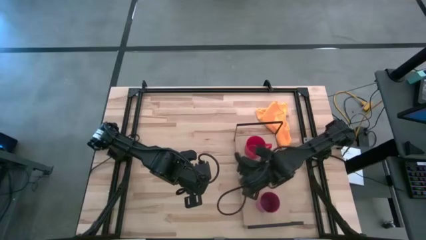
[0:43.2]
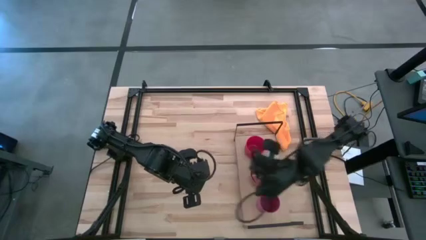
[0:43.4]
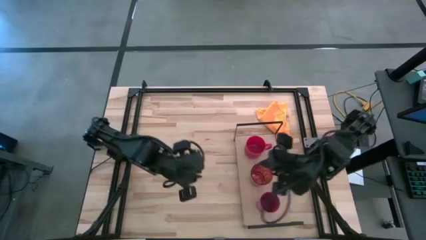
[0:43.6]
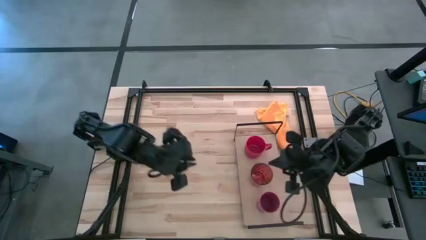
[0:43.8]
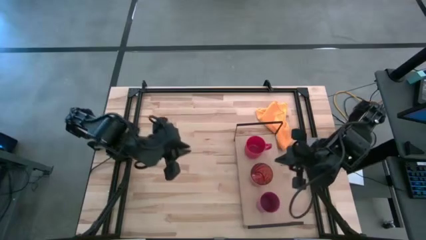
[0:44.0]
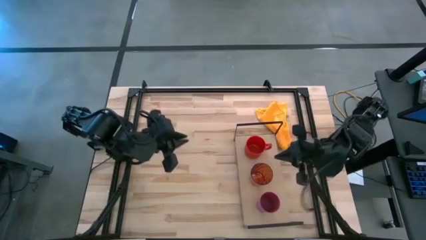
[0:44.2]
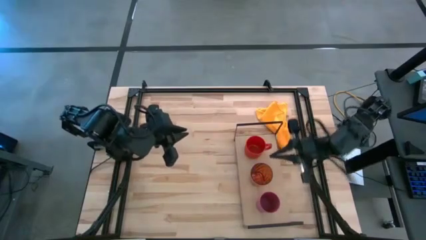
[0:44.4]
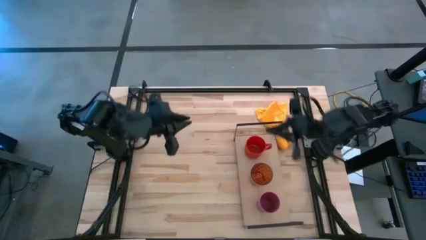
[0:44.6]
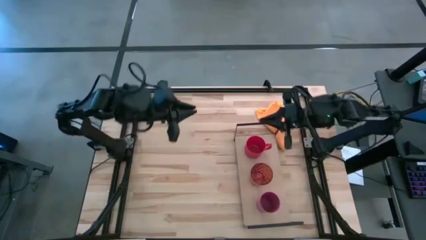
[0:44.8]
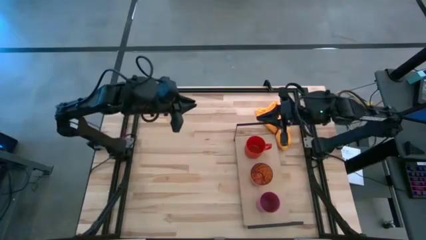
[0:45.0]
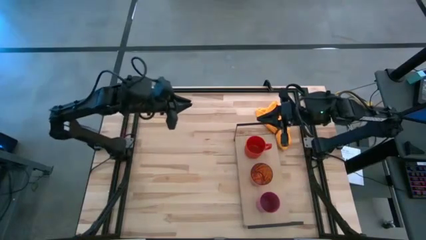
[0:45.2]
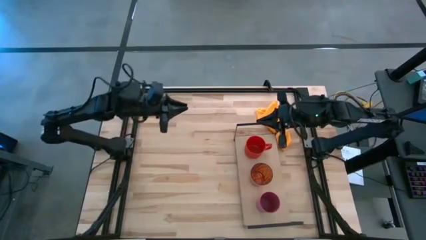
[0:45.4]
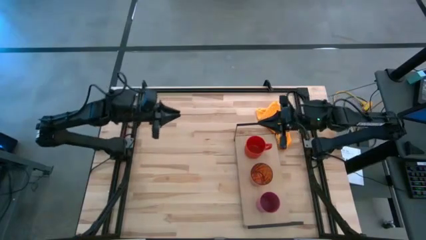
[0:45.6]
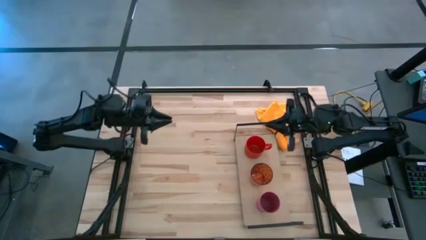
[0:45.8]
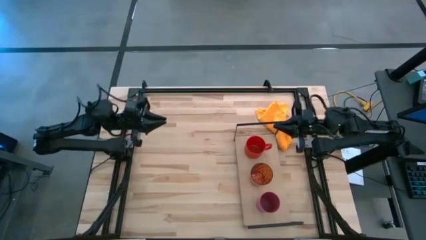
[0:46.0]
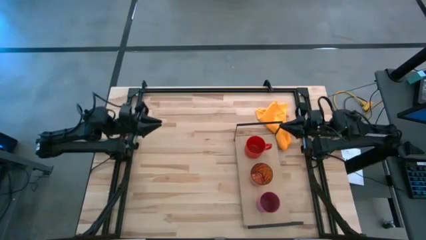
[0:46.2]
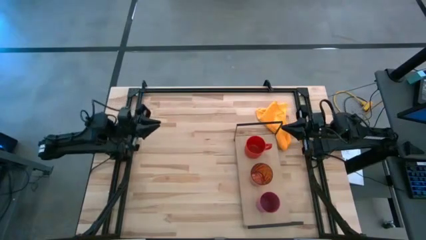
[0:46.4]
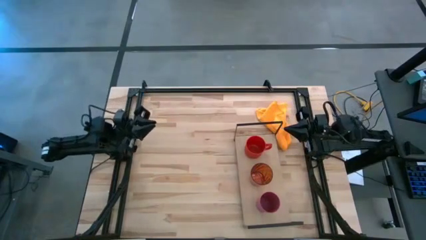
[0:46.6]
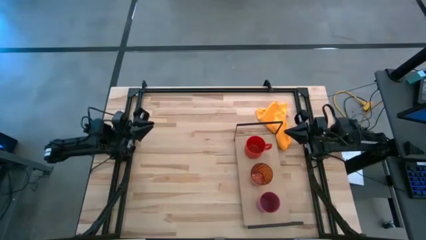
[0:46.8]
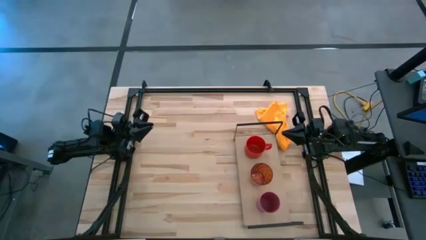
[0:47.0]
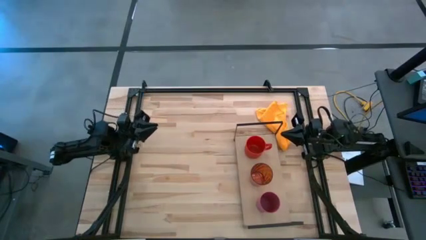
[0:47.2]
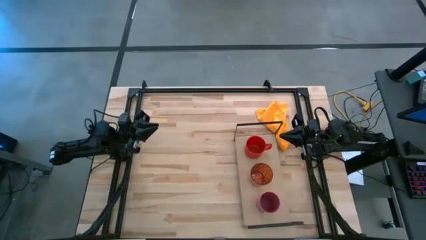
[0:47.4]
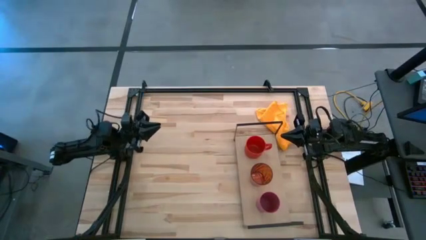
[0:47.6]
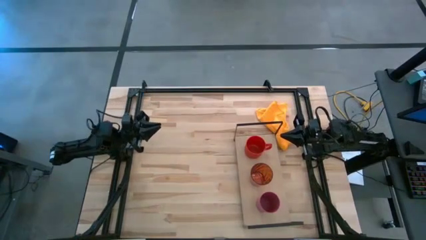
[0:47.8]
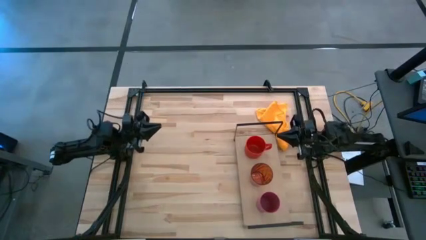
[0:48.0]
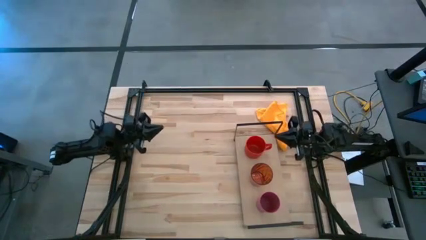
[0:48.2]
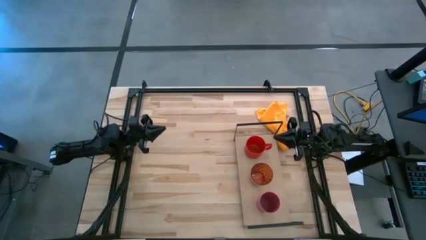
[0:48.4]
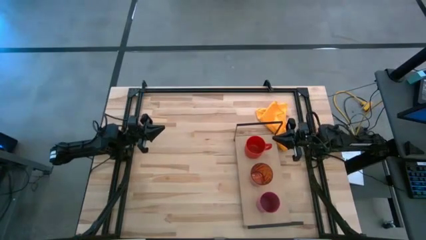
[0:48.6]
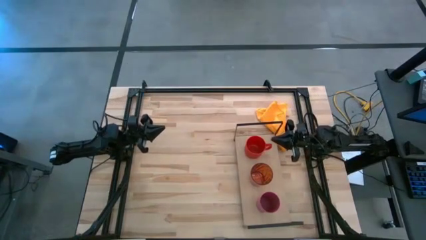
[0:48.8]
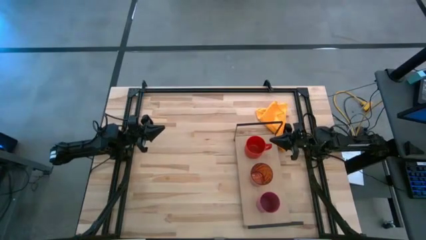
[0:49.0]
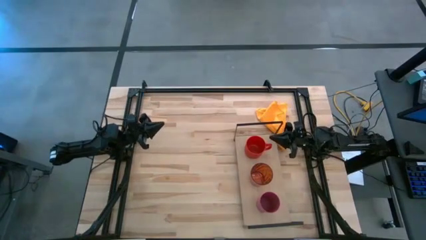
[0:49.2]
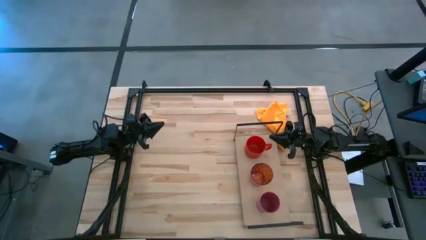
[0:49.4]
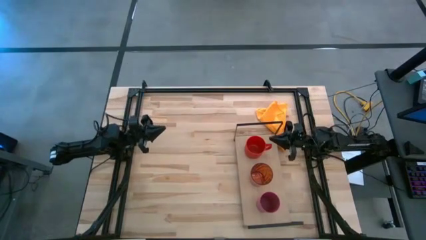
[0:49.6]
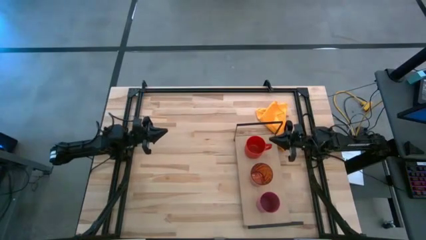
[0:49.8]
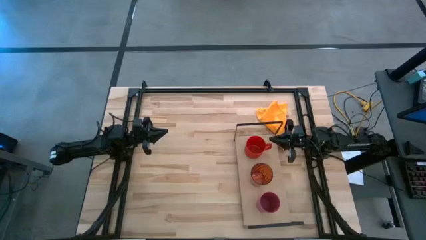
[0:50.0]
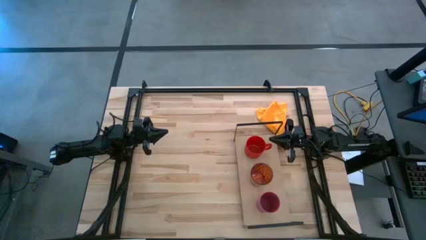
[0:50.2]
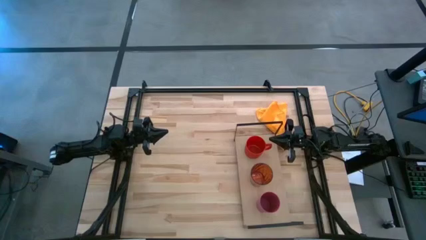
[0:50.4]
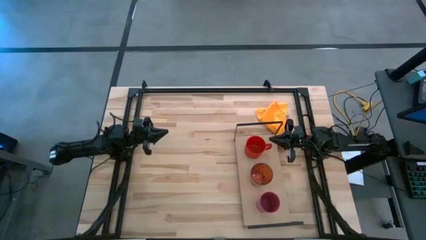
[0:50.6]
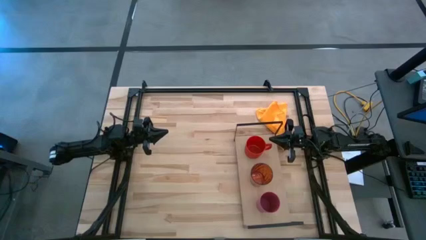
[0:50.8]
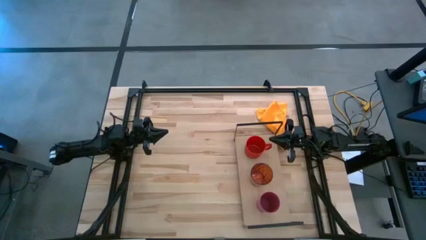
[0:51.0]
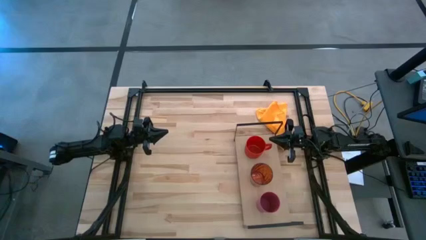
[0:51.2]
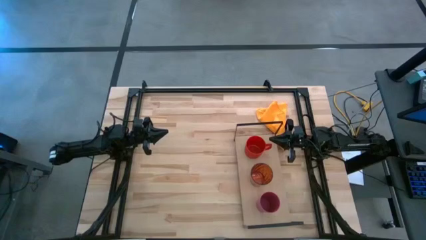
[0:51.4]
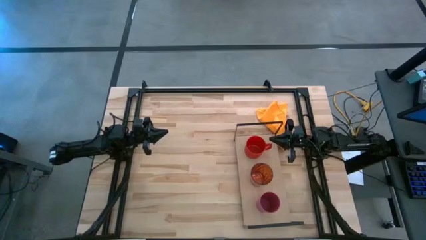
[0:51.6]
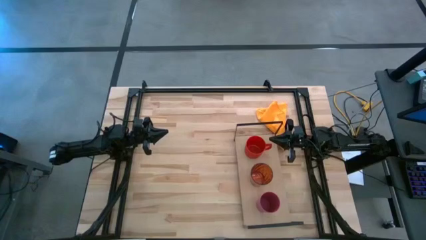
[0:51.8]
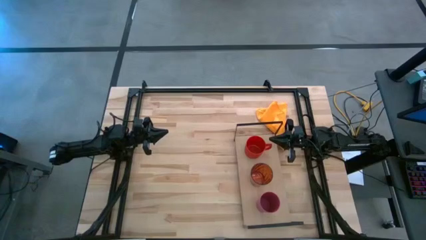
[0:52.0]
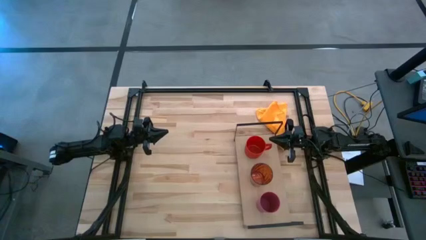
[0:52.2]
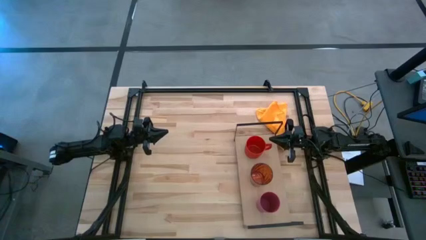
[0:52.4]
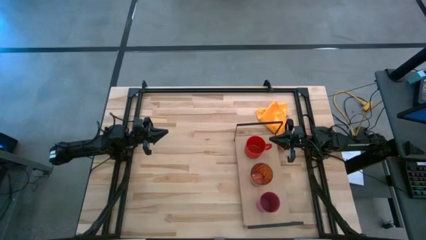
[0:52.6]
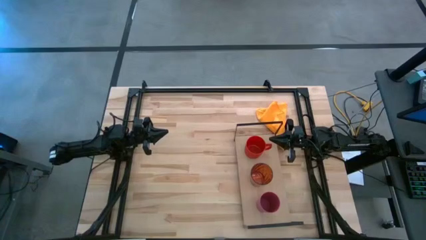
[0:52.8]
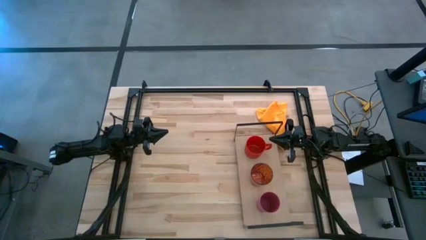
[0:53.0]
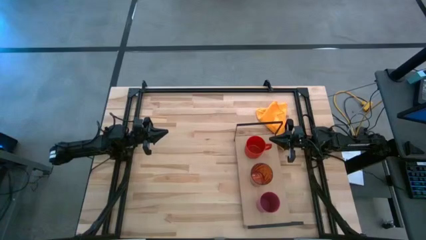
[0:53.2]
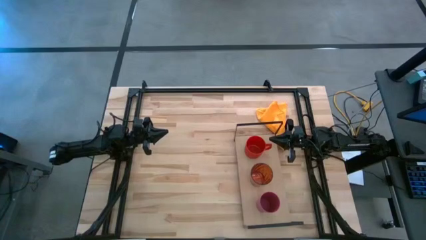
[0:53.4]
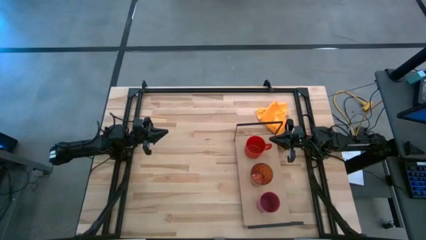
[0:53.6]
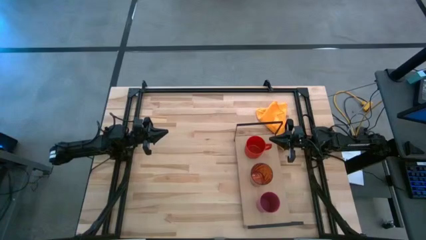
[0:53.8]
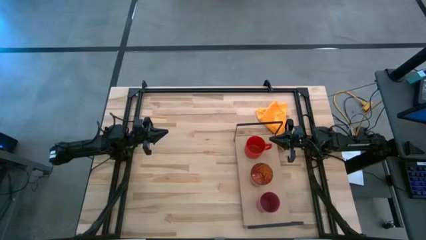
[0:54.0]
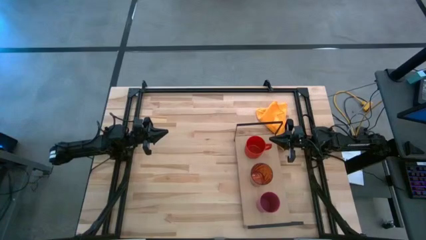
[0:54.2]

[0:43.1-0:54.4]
Task: Stack small to large cups/mugs on shelf
Return to Home Position

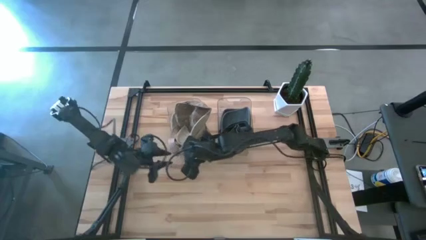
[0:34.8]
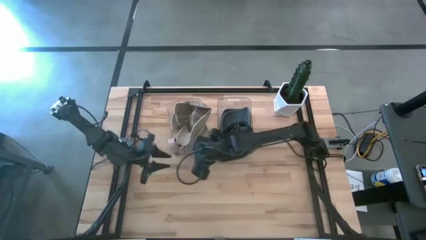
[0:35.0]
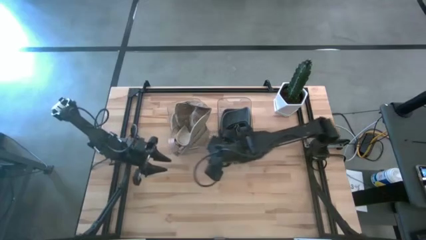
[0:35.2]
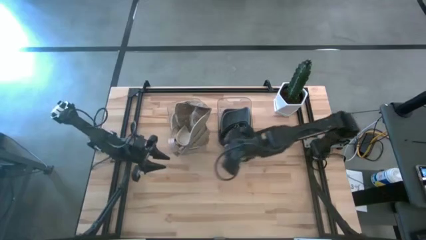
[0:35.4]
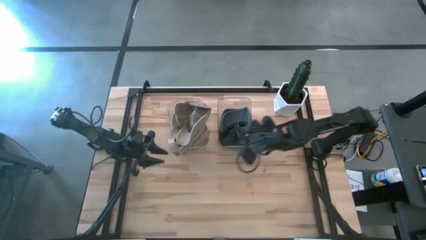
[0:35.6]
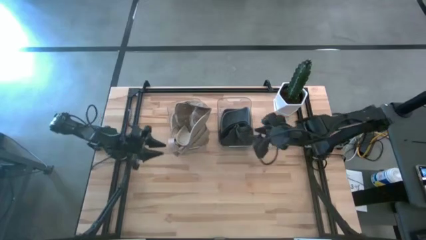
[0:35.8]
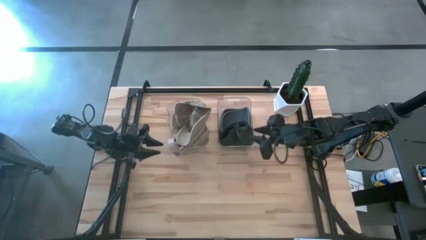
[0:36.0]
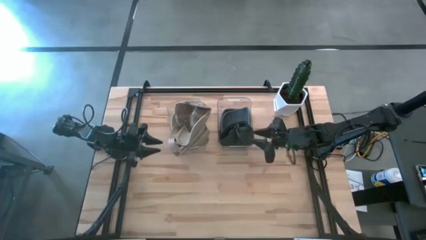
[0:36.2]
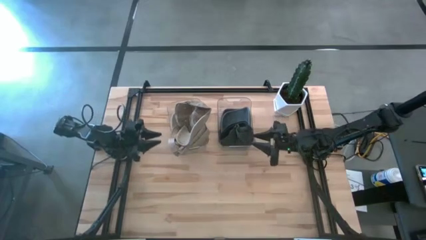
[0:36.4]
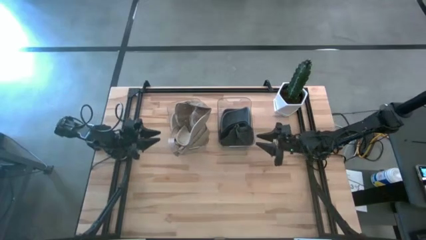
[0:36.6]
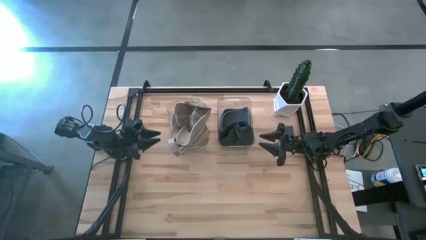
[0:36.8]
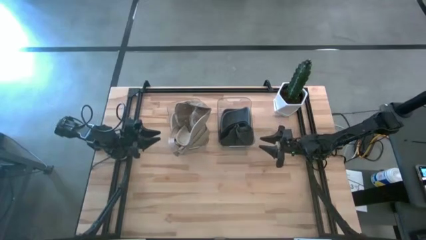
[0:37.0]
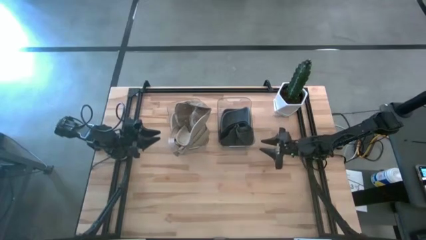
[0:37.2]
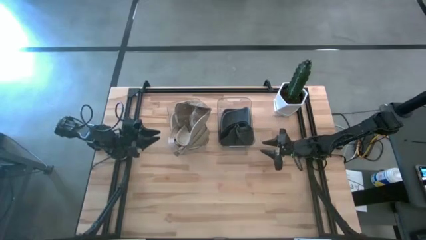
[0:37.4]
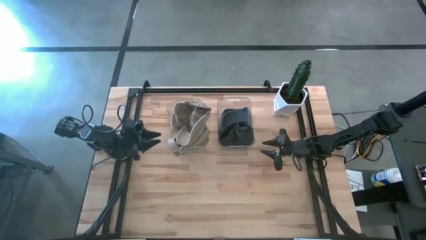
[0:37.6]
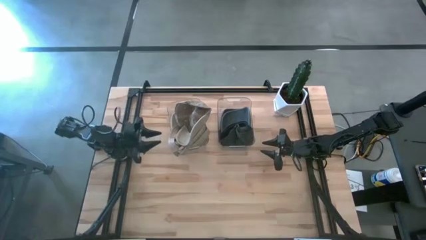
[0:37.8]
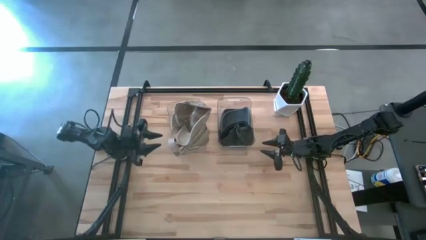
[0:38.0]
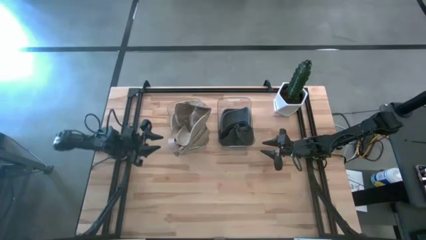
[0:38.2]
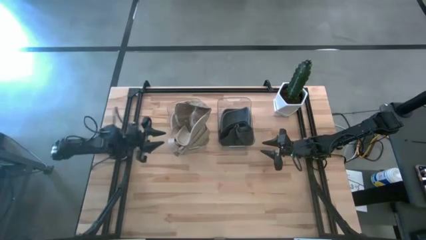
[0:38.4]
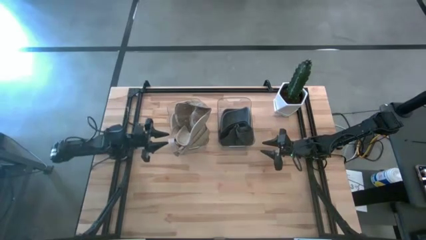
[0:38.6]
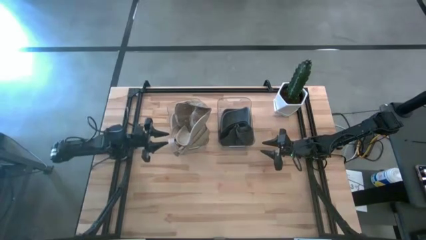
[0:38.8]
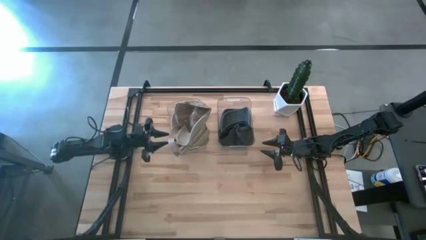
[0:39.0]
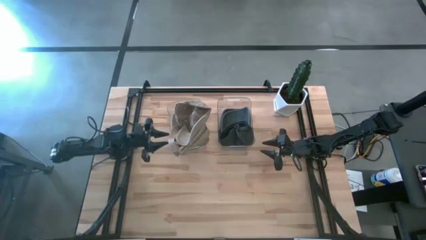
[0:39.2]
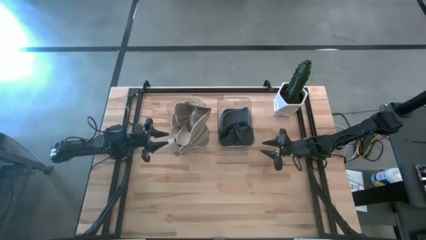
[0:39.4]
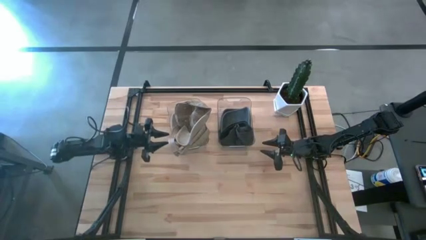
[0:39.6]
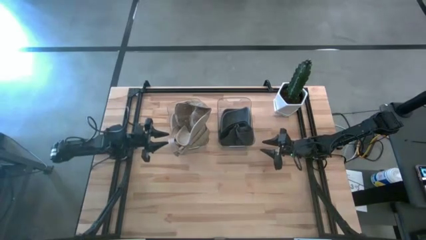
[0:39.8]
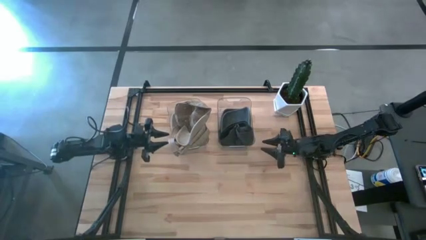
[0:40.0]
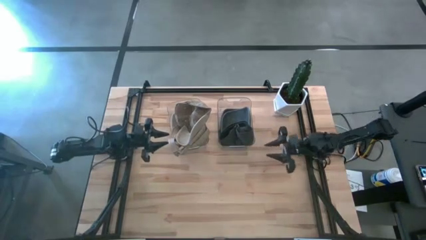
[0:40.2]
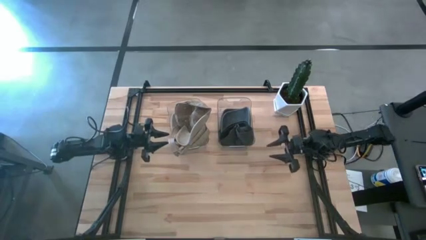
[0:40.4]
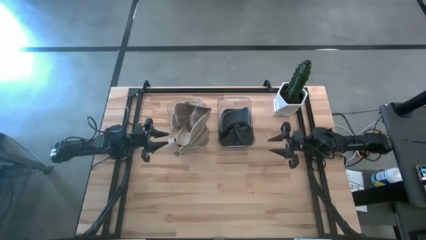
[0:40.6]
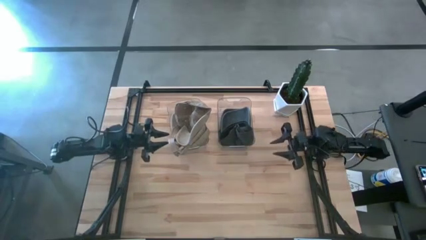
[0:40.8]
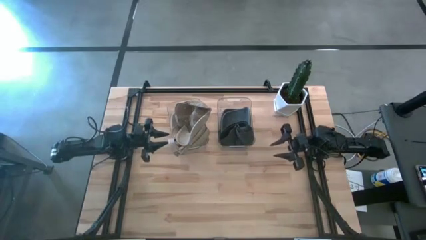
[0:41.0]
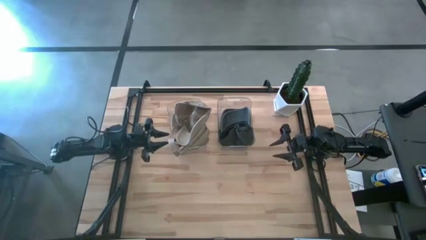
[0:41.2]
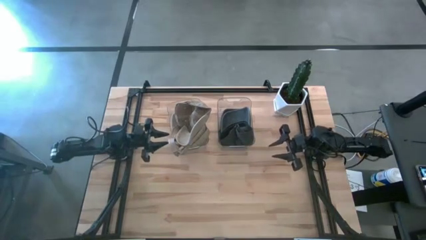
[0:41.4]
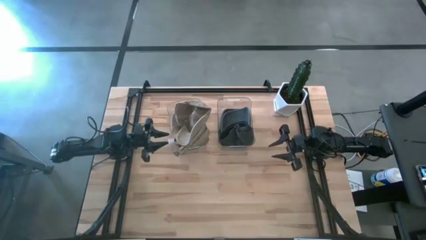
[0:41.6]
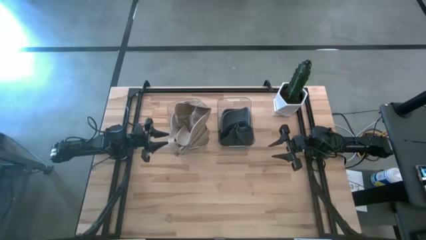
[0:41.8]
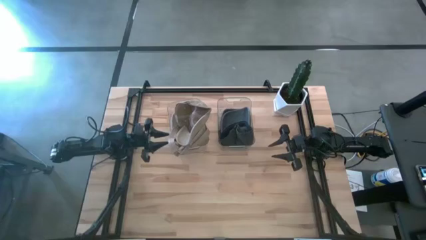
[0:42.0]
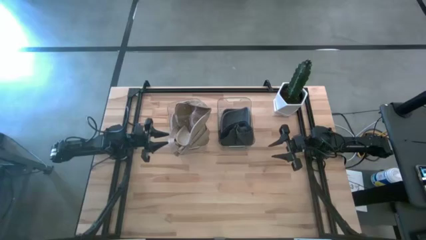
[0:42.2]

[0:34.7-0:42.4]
Task: Pick & Place hat
Return to Home Position
